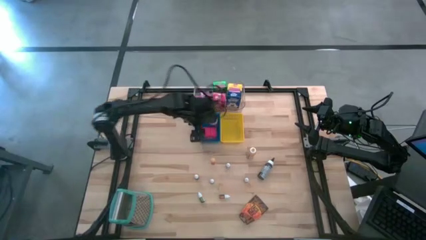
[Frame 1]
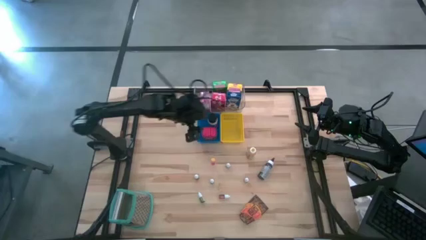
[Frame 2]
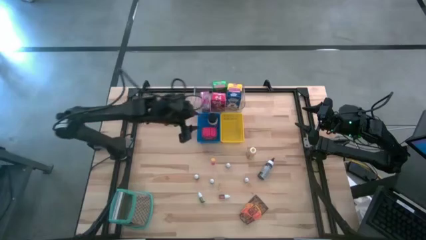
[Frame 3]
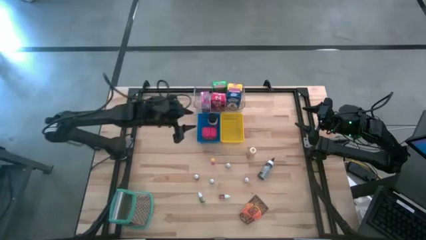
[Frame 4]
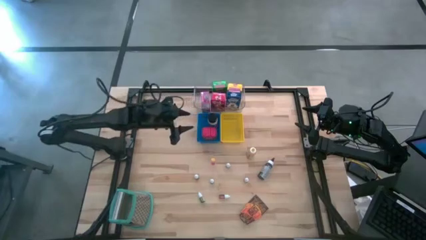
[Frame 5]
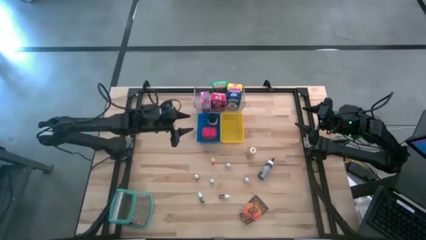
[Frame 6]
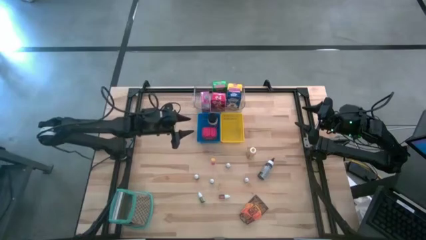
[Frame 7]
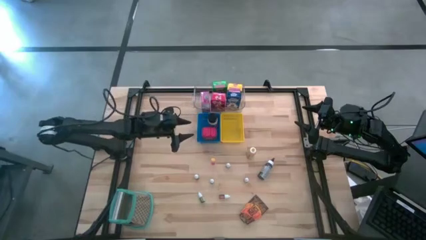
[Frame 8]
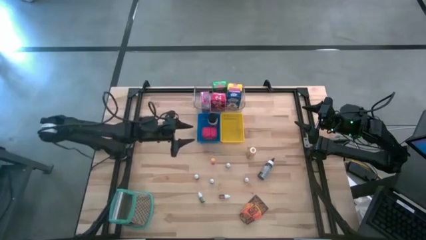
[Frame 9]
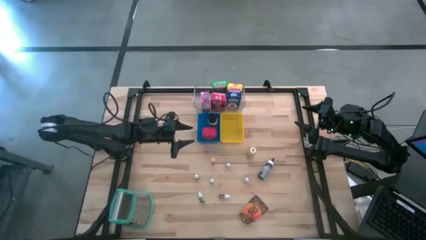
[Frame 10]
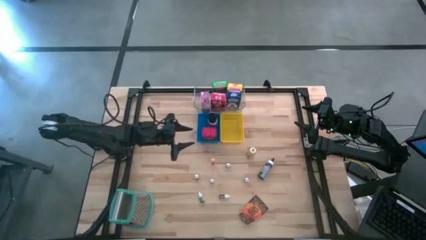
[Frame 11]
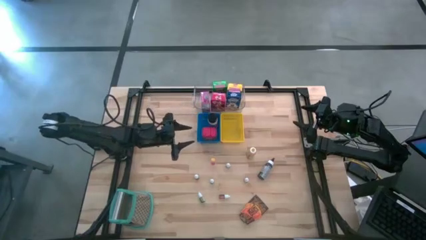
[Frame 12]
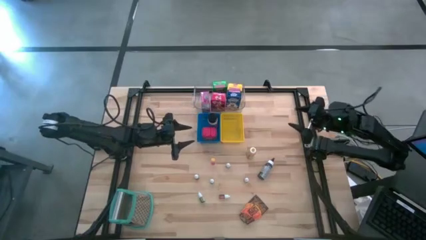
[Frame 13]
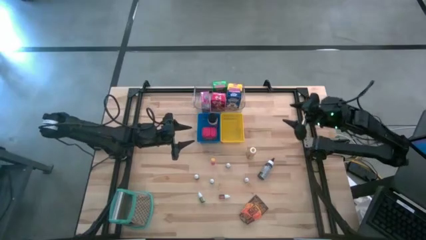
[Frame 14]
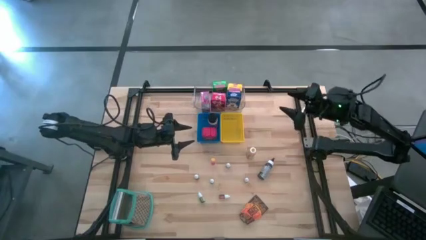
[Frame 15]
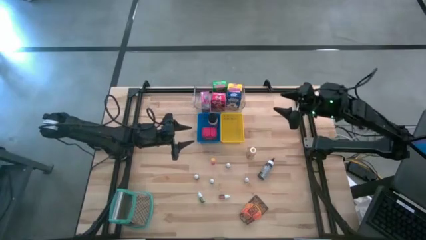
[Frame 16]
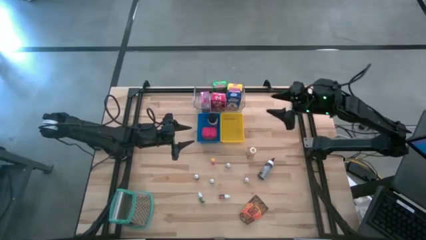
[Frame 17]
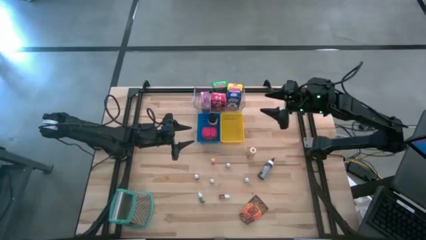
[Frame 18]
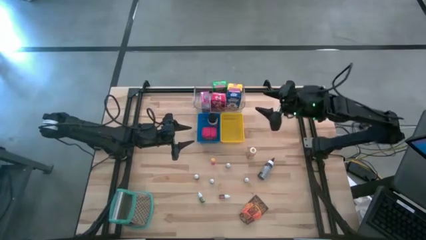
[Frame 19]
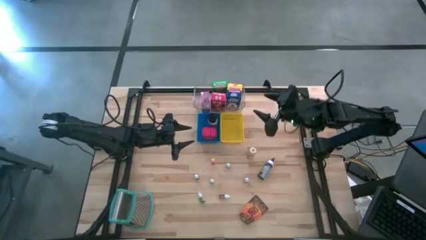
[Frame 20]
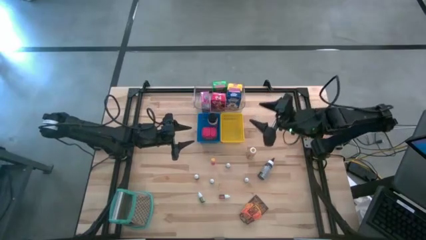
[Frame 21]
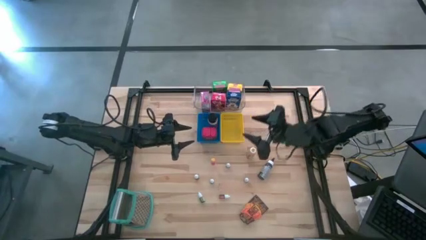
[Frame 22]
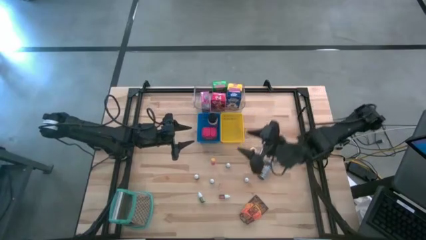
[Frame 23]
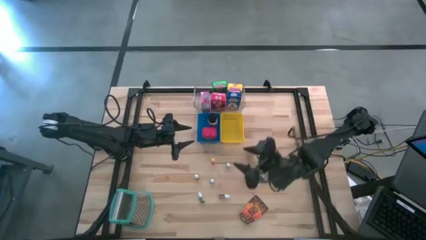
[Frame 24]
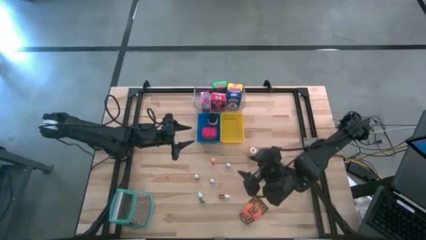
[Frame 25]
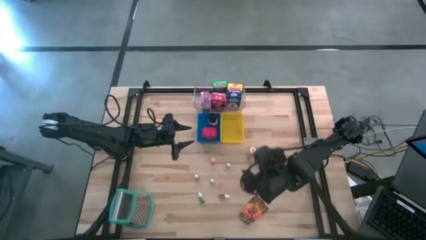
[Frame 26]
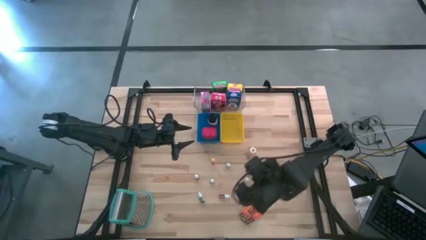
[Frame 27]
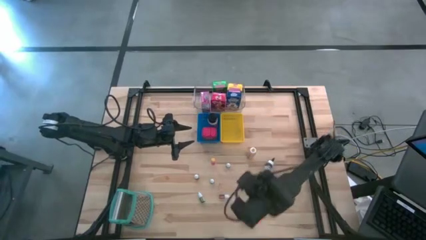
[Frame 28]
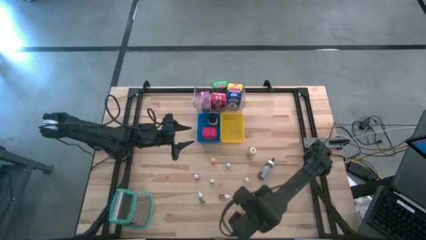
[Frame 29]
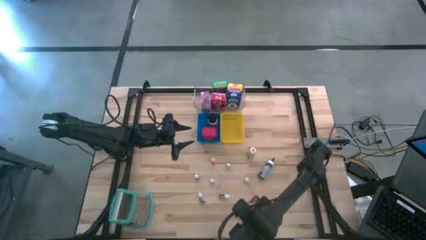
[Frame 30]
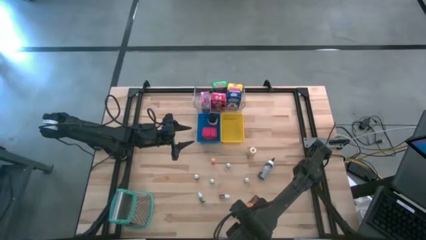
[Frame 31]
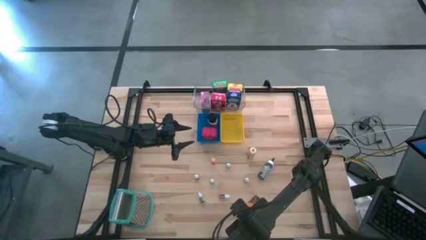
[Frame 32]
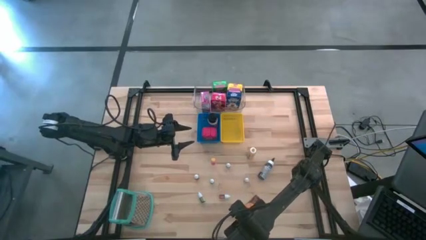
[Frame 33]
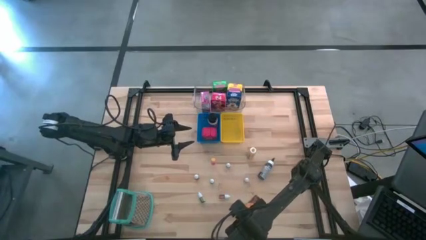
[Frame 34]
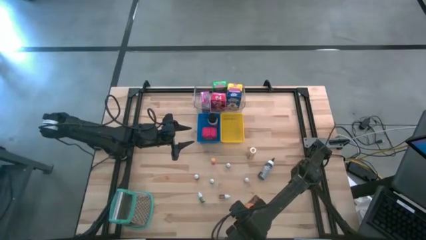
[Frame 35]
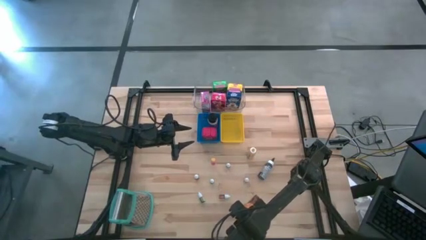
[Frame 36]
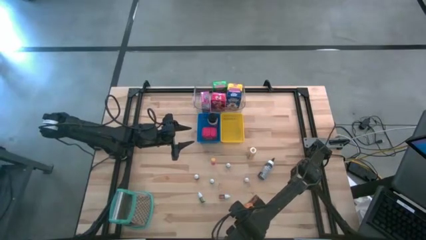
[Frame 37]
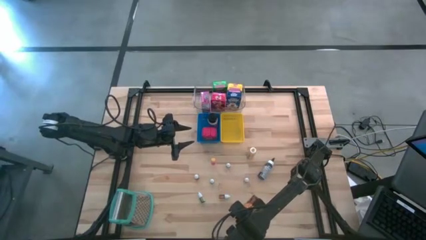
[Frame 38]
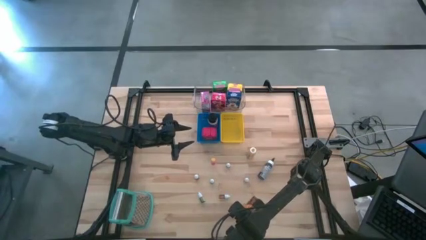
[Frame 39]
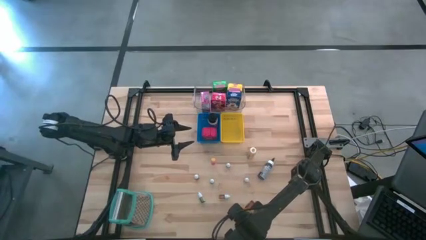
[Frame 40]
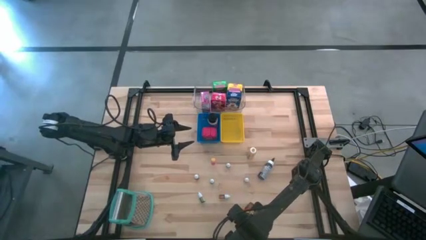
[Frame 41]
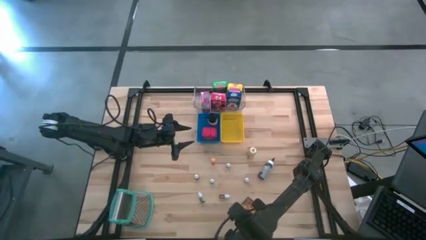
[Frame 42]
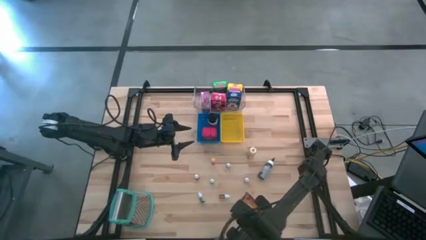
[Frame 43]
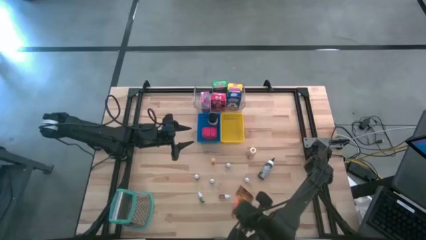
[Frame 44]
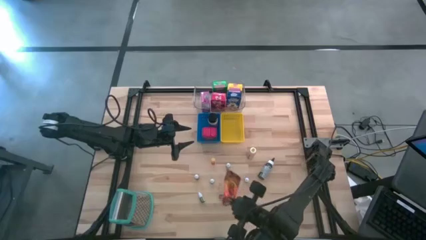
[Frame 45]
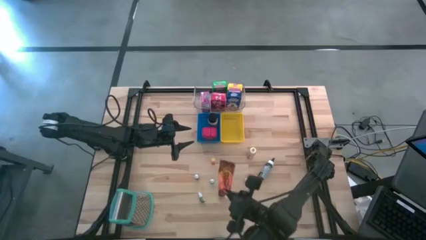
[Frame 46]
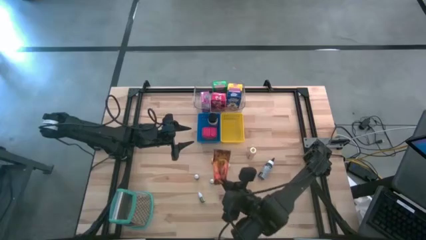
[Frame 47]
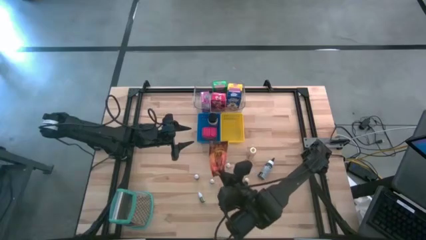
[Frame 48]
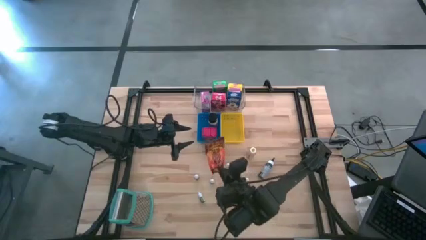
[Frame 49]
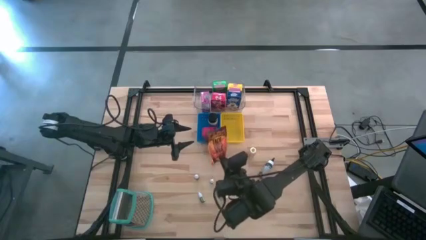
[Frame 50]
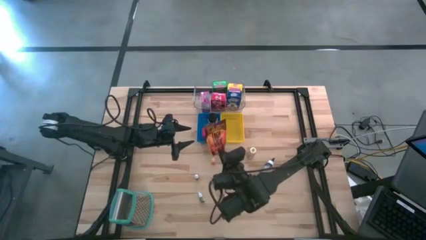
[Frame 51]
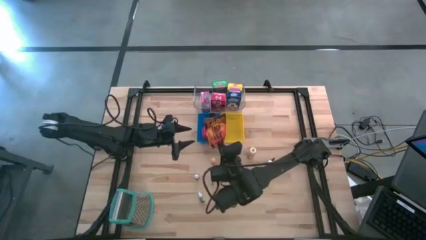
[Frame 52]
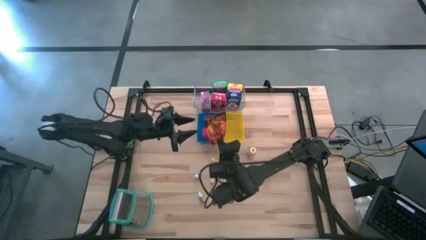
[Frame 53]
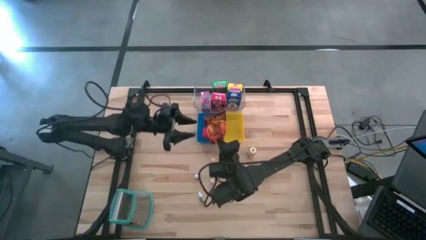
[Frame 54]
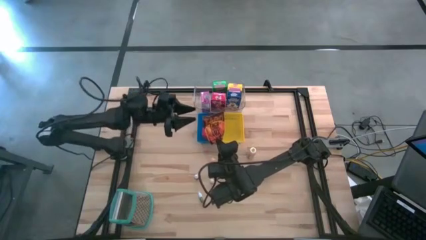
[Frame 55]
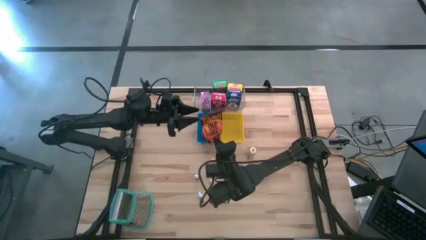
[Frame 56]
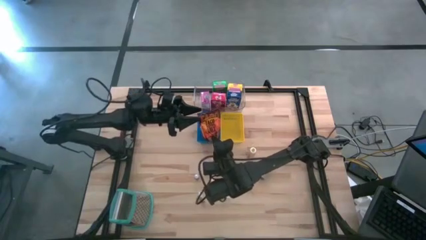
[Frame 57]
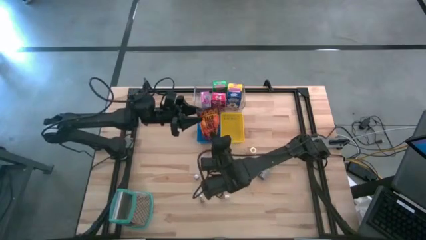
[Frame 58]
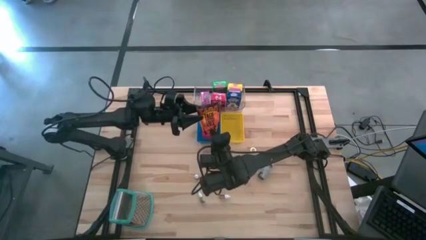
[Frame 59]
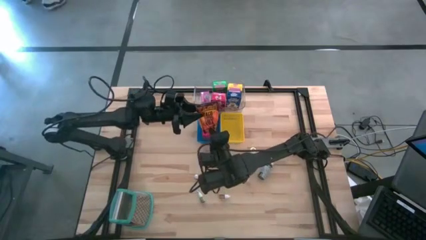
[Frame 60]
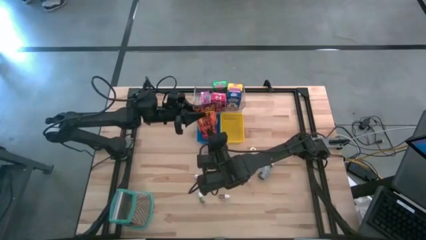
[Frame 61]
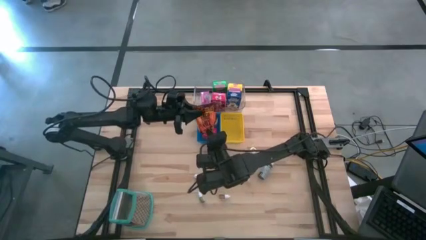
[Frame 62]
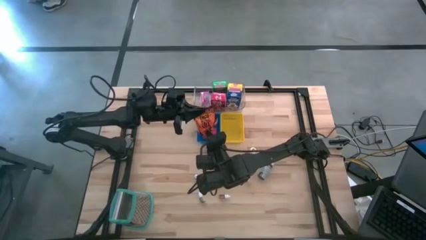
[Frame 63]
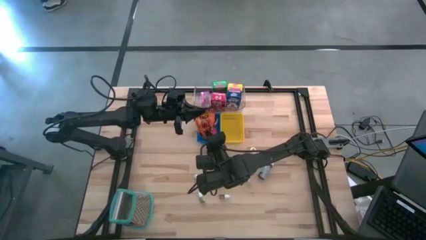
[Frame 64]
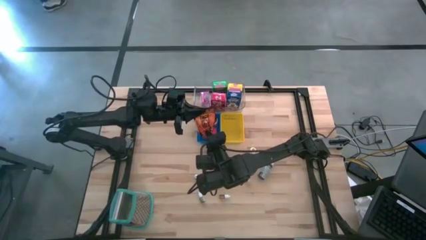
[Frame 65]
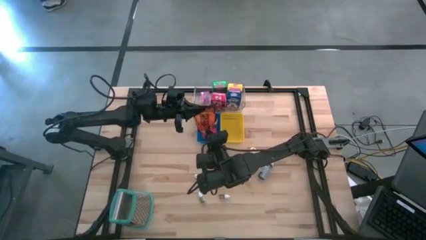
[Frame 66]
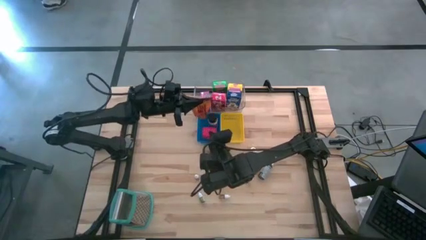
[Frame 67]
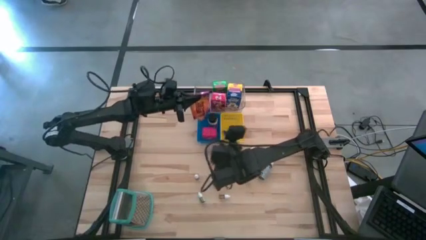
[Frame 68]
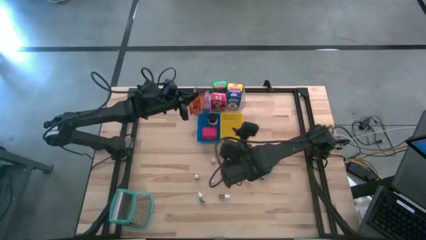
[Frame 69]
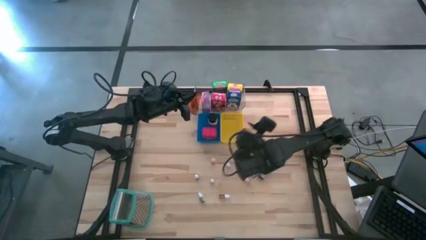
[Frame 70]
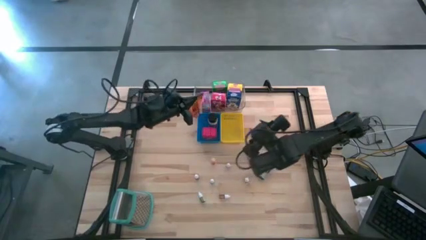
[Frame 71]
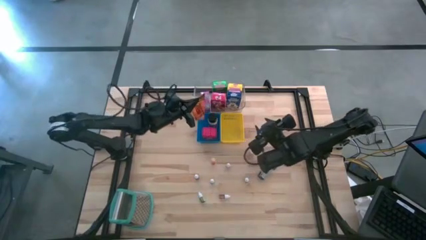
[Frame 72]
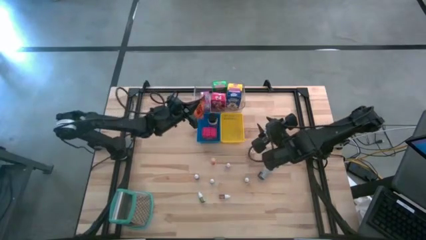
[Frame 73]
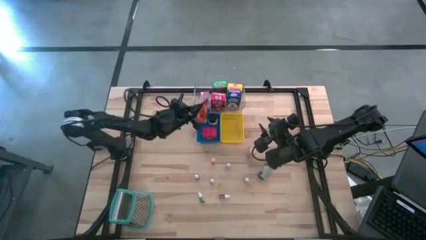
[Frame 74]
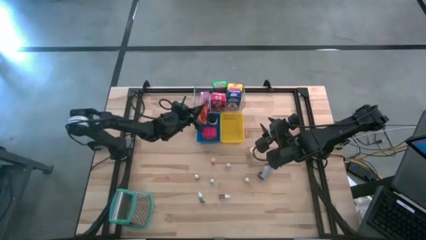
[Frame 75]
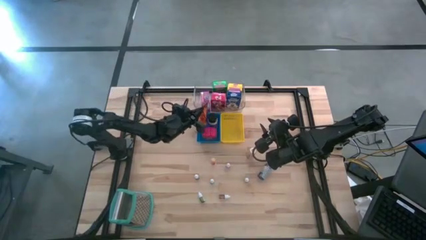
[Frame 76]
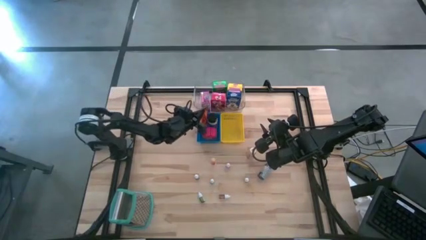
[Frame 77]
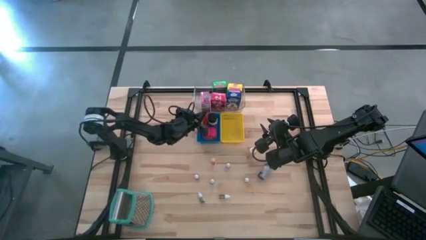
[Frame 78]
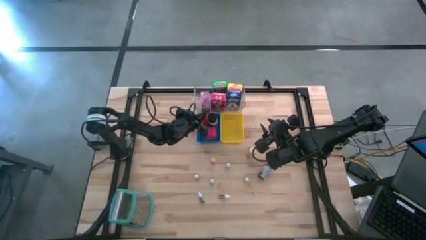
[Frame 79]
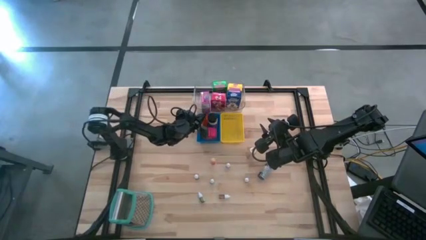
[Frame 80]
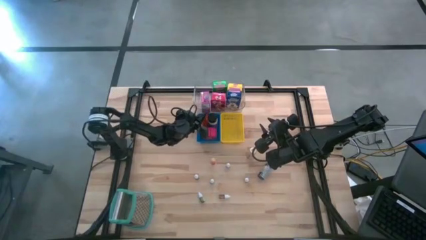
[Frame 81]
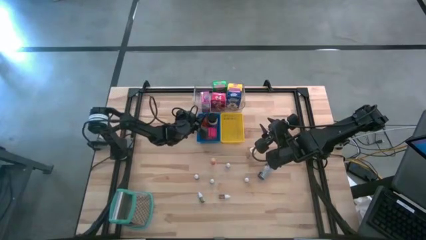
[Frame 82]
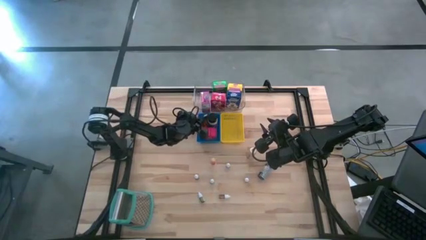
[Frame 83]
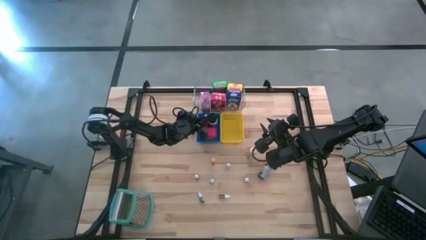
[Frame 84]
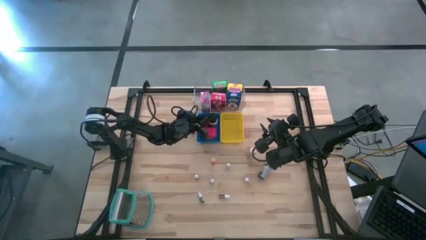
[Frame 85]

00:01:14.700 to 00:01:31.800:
Task: Pick & Place Kitchen Items
Put the brown seasoning bag into the blue bin
